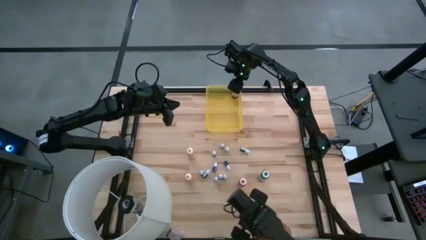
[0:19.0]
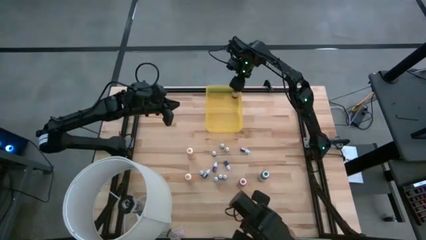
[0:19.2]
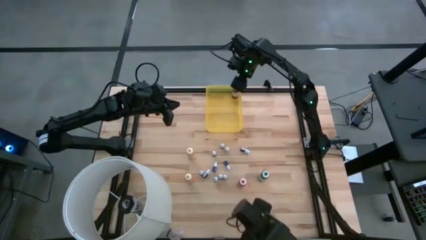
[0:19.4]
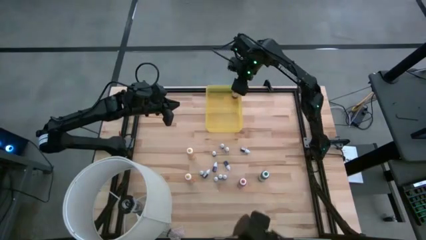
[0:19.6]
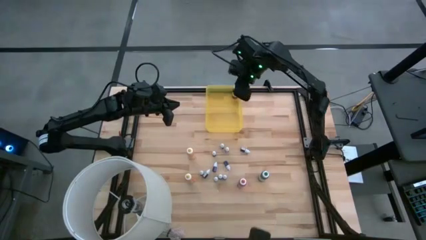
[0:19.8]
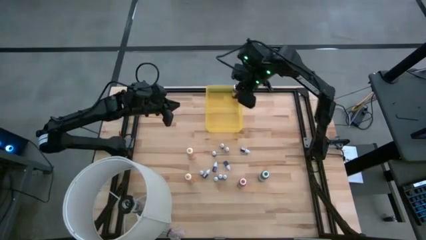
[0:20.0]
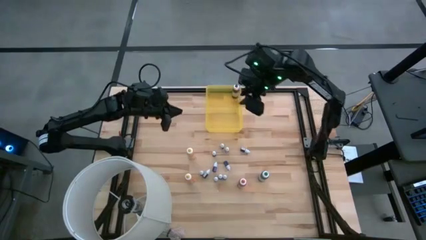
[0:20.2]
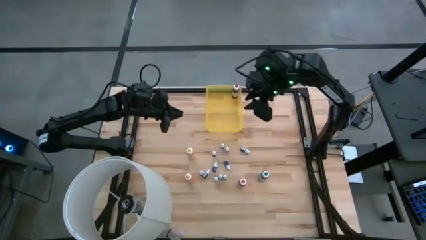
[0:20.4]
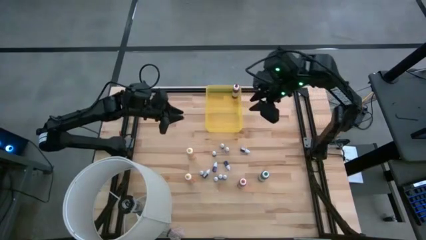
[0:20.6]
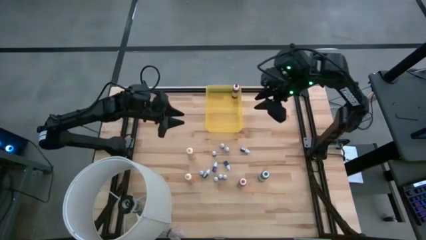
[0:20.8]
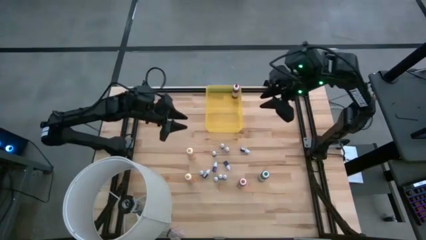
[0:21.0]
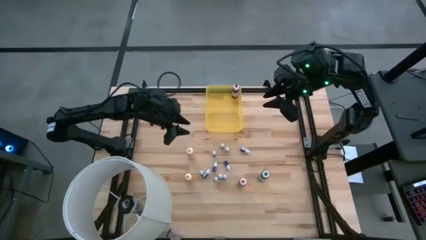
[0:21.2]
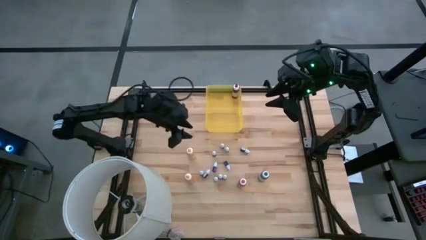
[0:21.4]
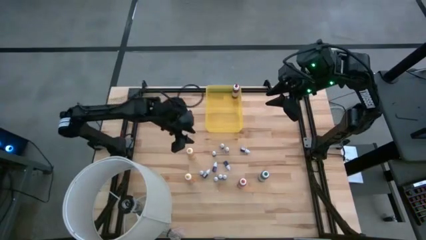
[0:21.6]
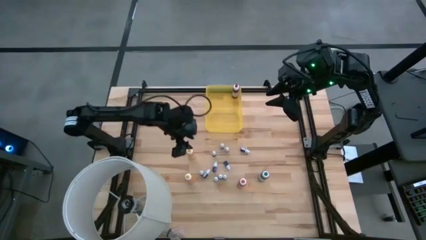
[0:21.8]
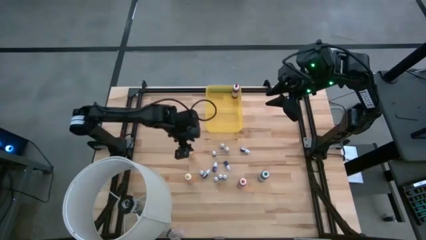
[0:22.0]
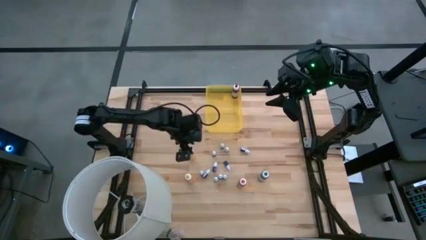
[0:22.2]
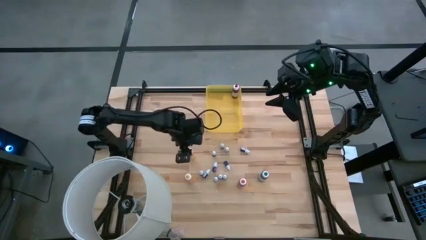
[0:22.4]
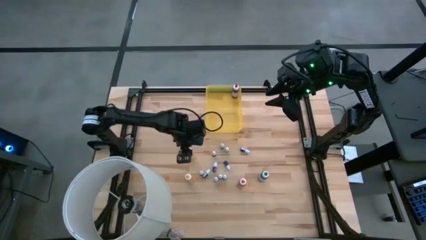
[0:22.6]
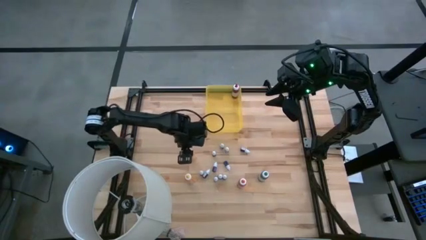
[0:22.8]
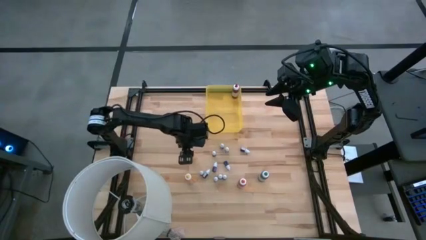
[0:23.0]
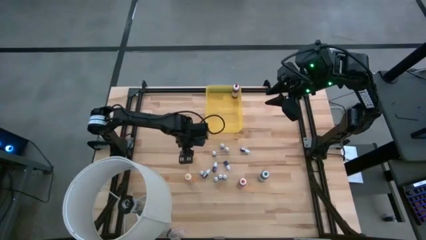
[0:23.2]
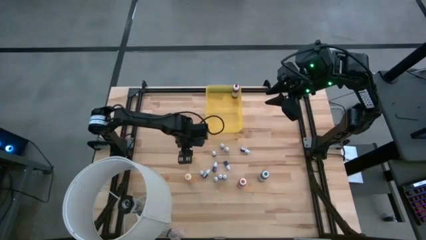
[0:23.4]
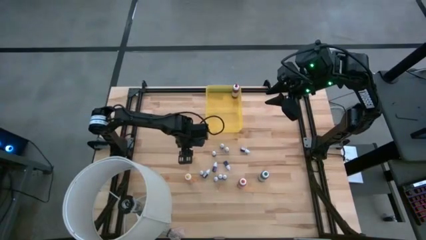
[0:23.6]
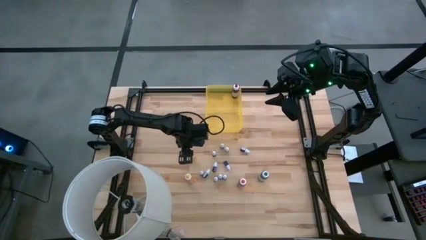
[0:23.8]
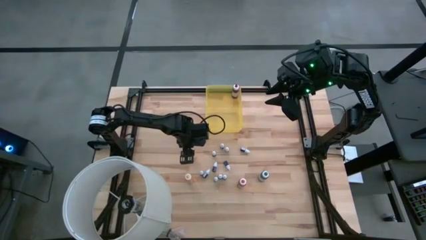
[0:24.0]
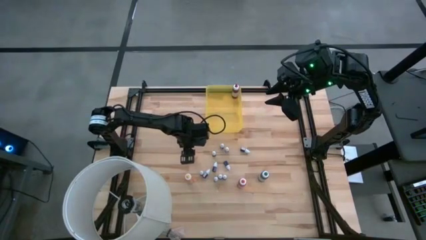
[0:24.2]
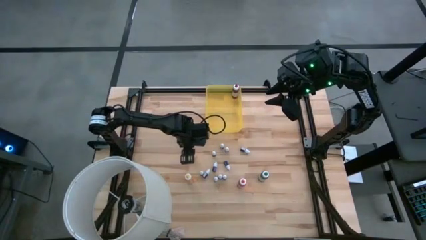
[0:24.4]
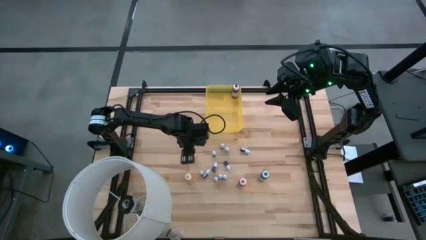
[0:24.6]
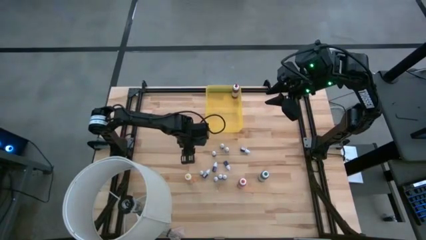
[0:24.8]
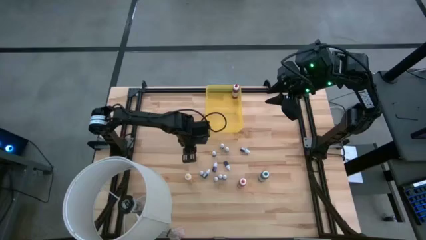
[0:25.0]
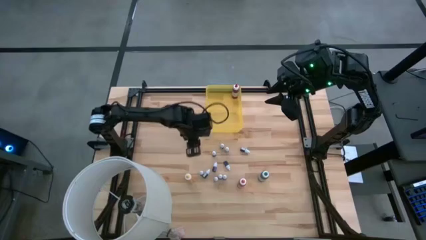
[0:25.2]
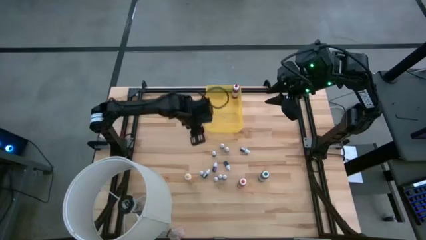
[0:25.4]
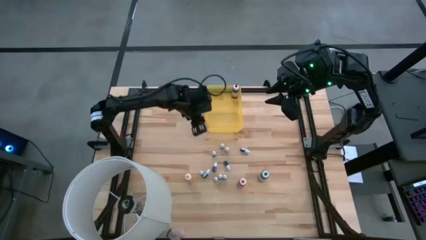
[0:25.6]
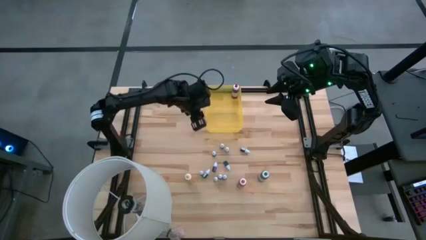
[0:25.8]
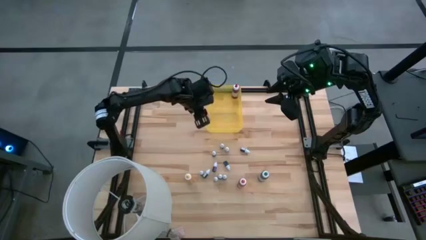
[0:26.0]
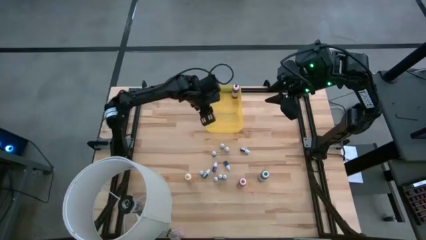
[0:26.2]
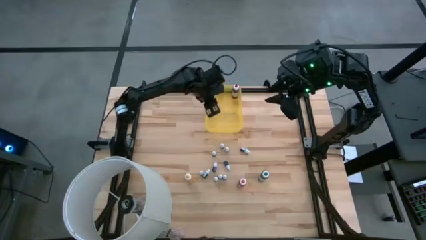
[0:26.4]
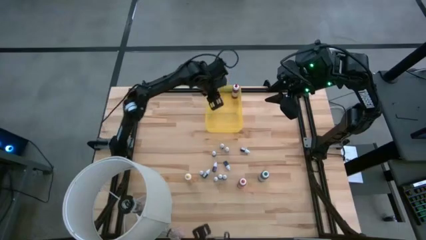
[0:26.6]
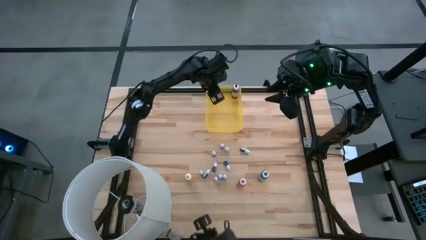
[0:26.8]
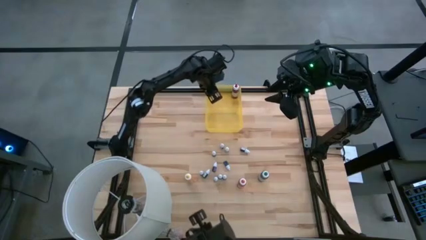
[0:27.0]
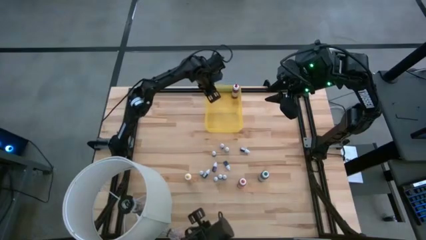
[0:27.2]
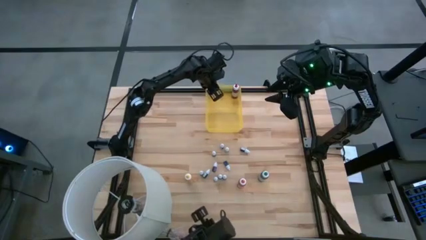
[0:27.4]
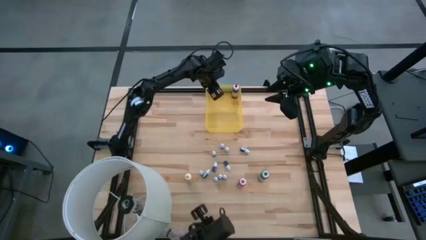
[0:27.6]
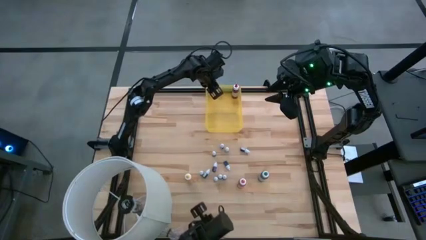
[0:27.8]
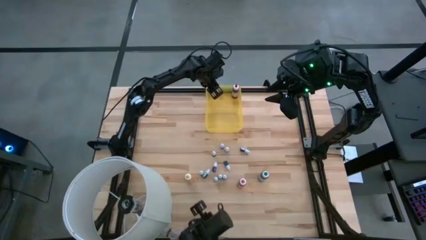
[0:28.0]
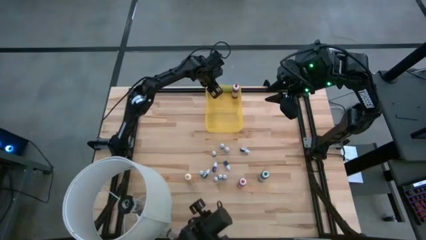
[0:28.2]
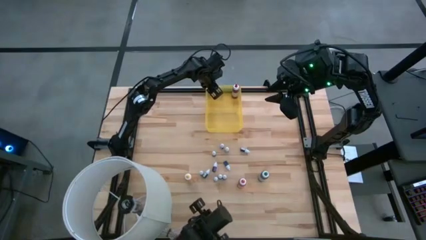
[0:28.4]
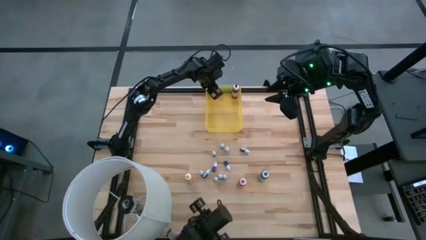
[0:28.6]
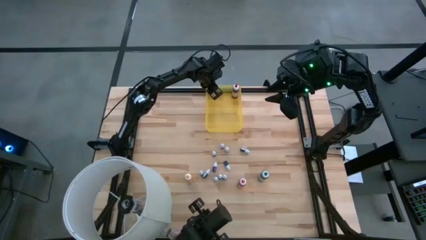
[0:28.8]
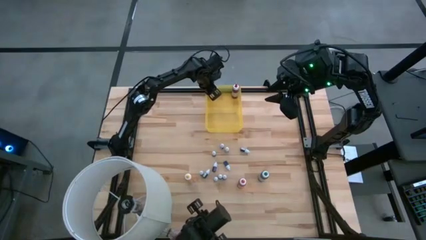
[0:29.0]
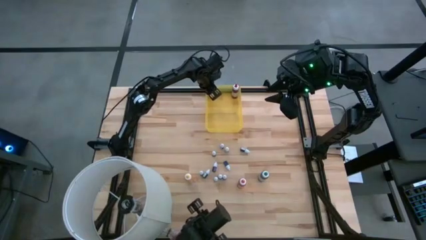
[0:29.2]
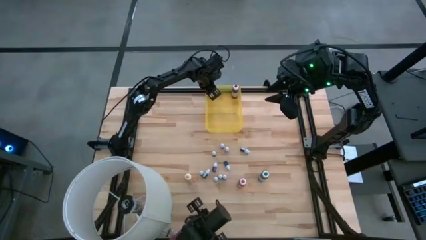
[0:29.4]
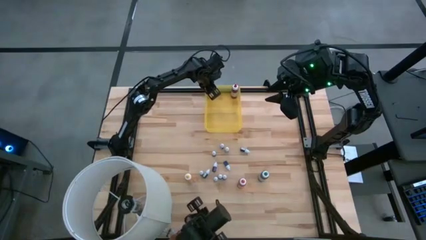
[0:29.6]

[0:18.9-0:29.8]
Task: Pick & Place food coloring
Put the top large yellow food coloring bottle into the yellow container
